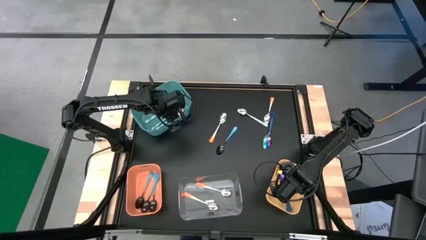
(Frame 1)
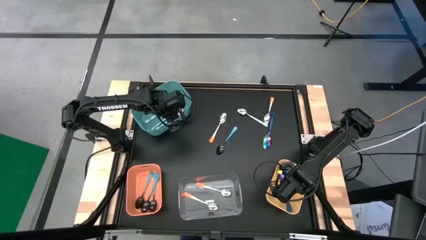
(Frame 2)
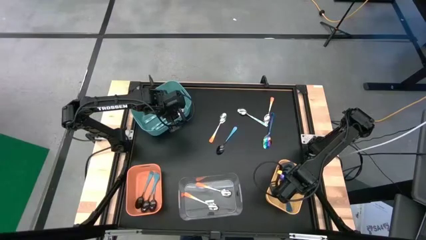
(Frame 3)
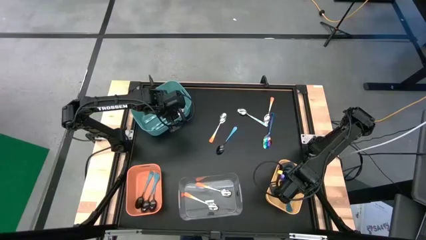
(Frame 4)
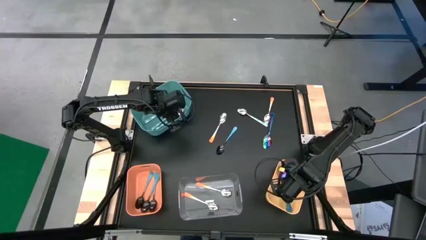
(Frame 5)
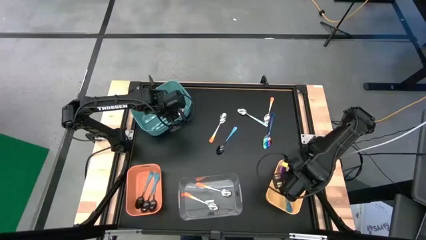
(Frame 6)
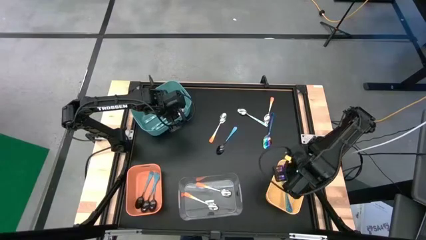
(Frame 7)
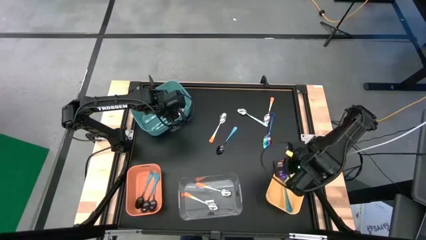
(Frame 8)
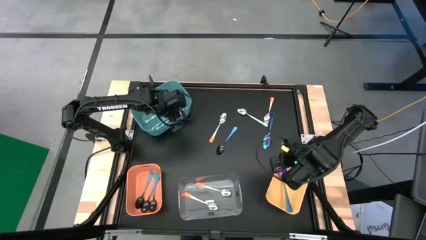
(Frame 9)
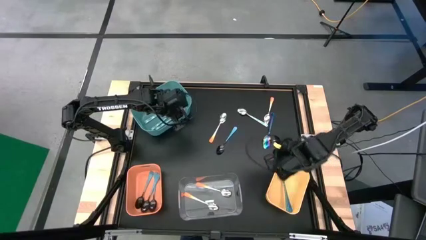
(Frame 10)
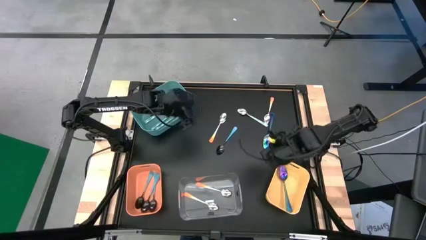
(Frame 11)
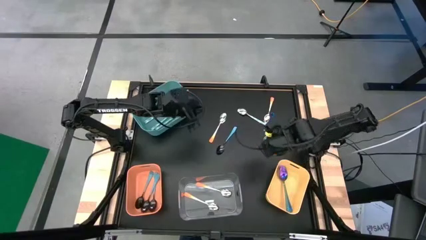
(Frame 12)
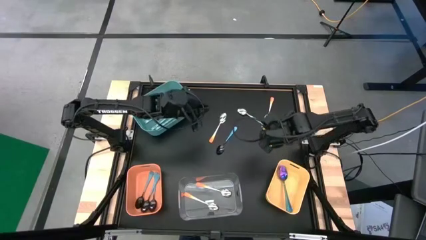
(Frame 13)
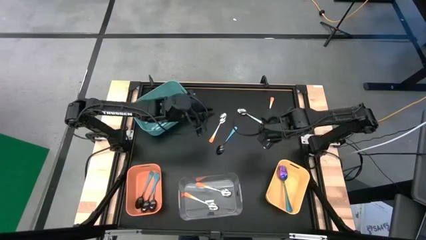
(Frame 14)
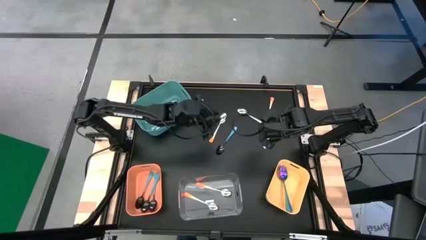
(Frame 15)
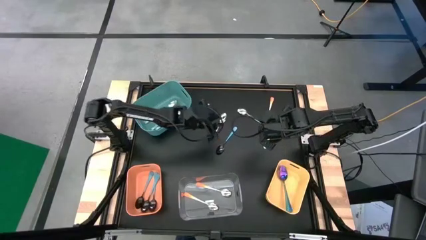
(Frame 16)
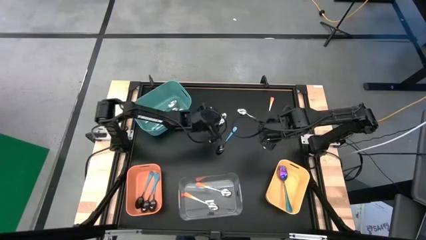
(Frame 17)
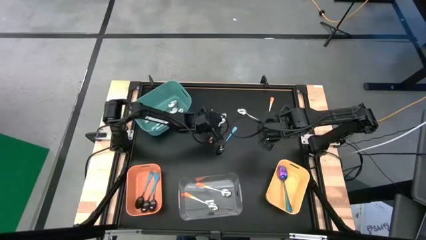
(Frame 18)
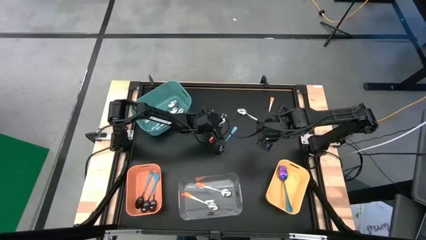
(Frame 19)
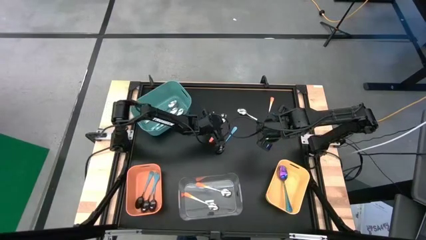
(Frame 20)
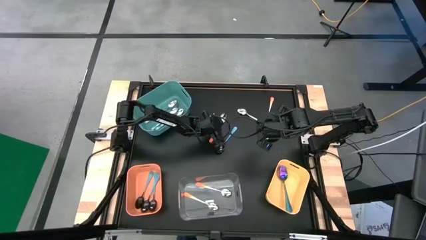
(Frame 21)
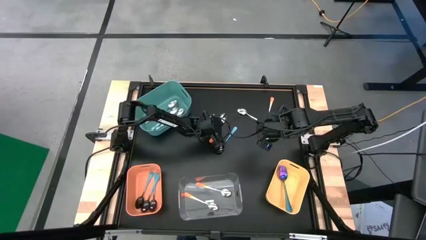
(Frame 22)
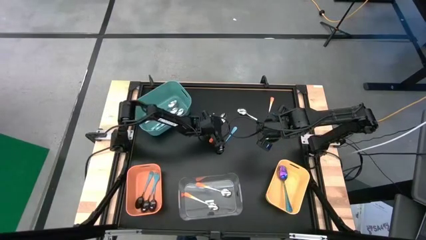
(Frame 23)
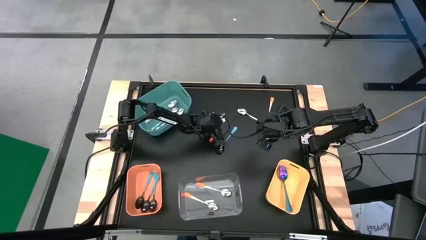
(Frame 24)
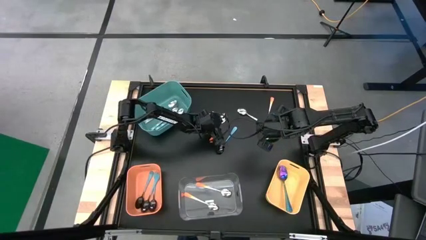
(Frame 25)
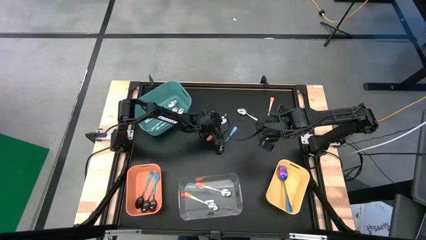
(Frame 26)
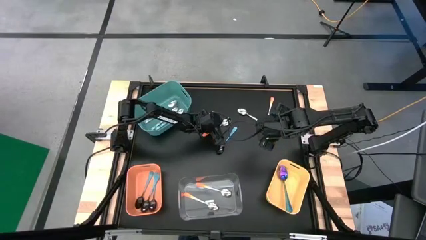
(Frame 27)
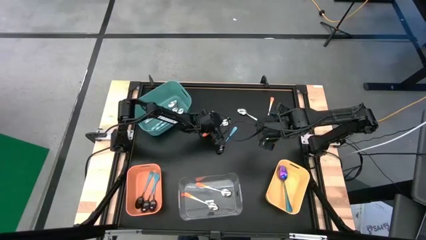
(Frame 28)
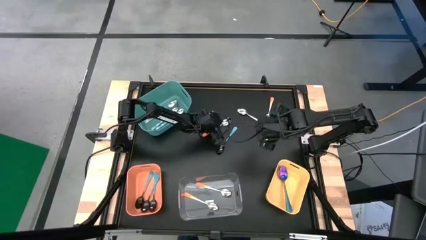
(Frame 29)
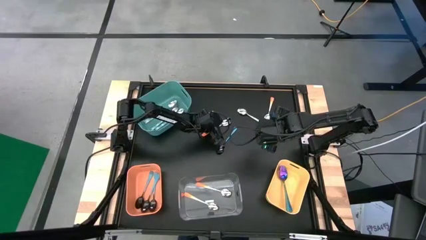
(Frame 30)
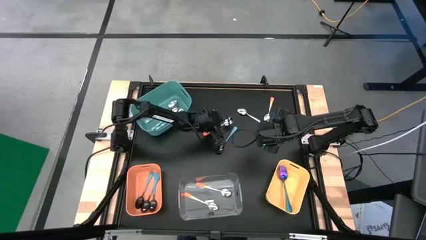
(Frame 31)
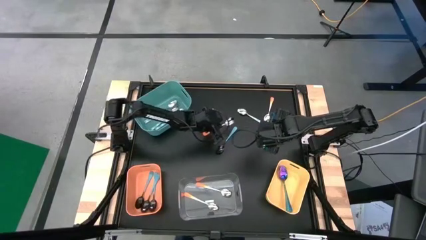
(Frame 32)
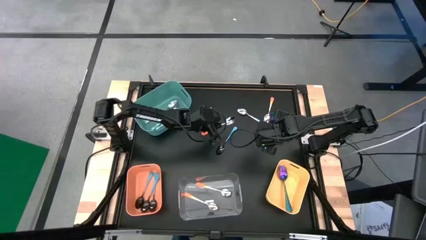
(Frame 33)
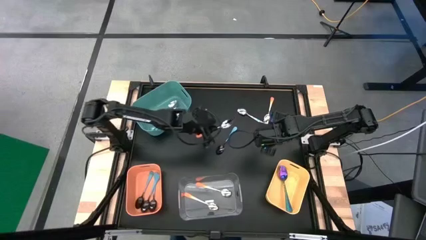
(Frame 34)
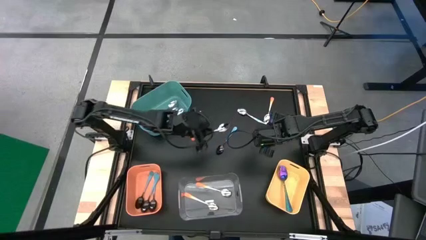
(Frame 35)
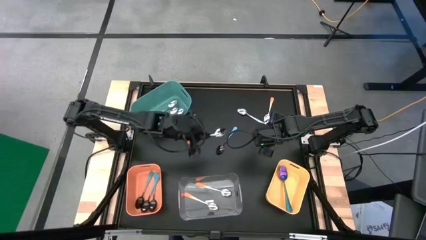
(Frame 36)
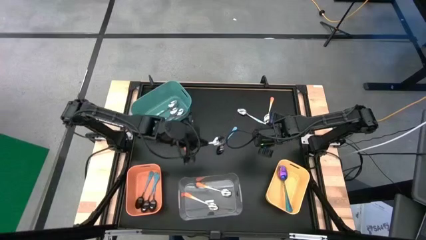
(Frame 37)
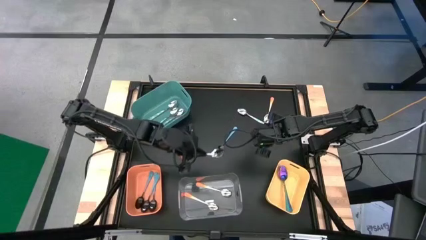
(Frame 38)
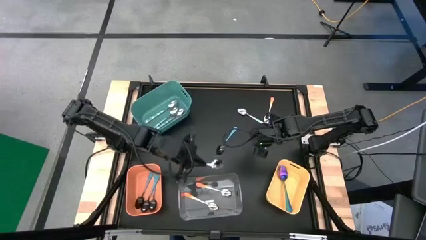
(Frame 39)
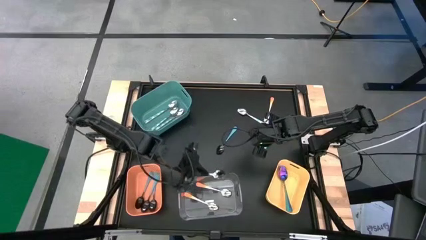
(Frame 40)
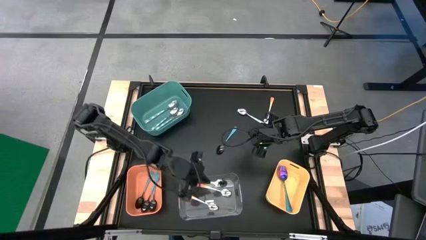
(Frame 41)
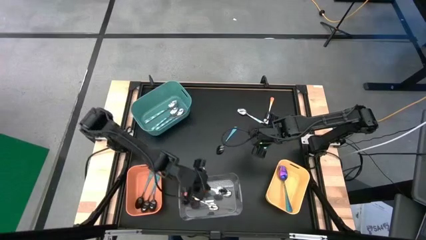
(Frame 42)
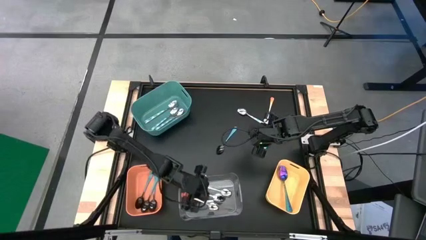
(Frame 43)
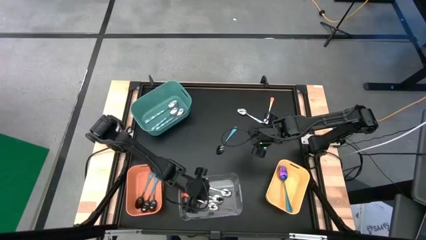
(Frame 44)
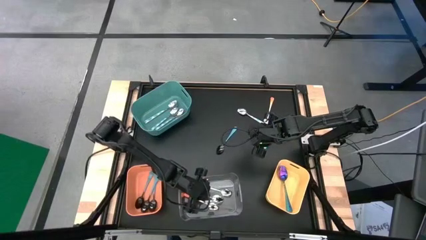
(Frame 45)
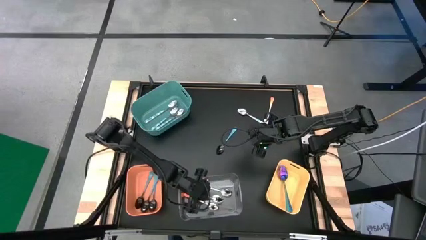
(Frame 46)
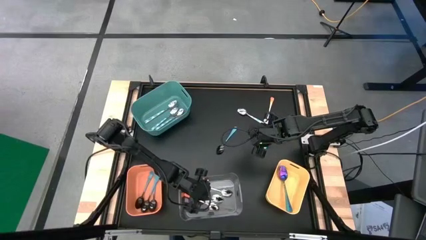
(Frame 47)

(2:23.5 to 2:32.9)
Task: Sort silverware by color (type)
Put the orange spoon into the transparent bin

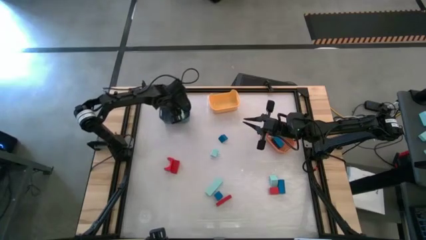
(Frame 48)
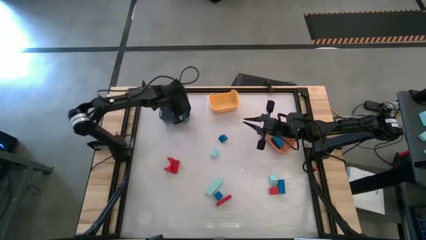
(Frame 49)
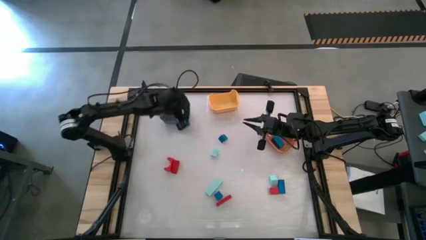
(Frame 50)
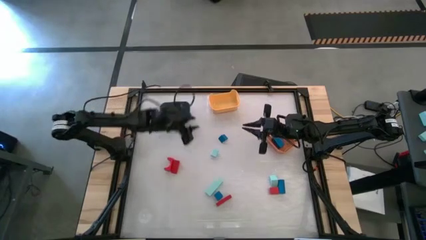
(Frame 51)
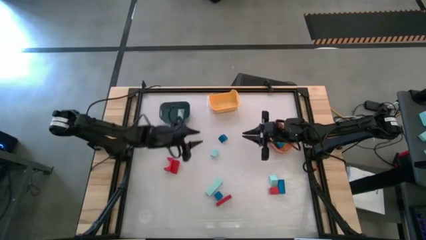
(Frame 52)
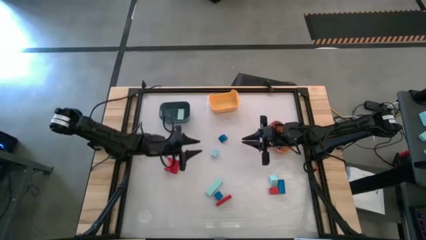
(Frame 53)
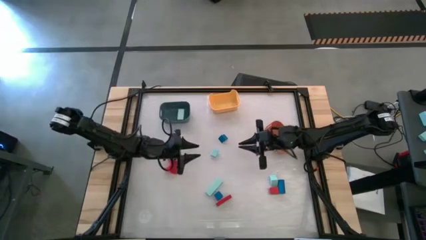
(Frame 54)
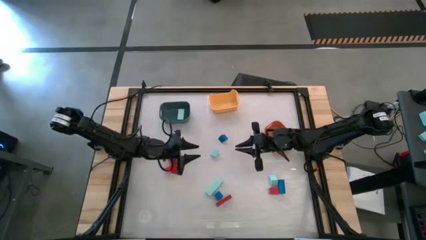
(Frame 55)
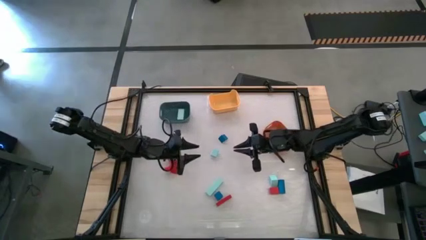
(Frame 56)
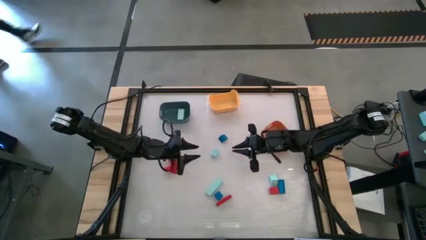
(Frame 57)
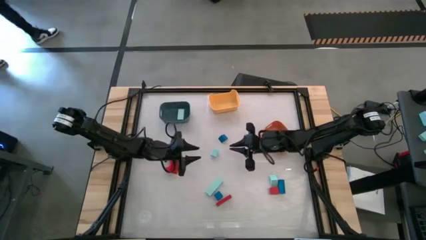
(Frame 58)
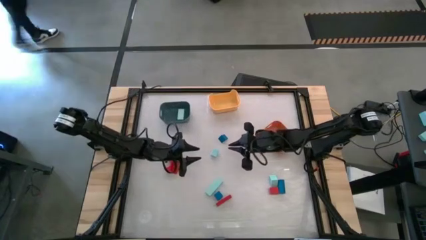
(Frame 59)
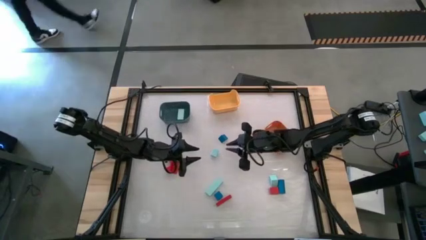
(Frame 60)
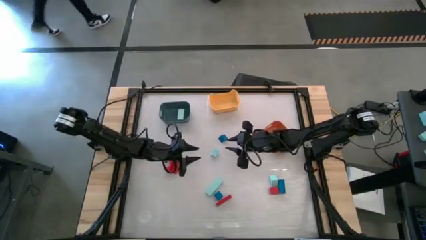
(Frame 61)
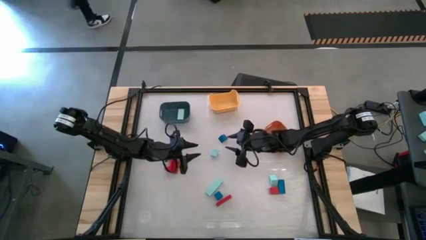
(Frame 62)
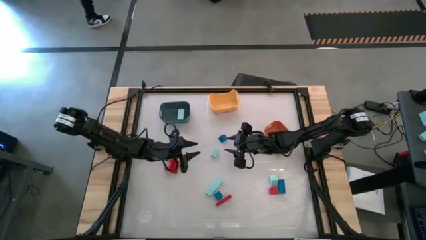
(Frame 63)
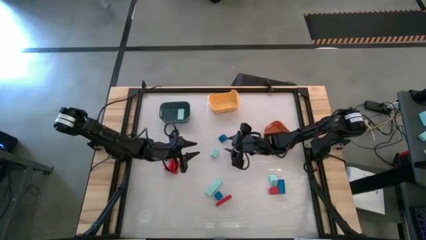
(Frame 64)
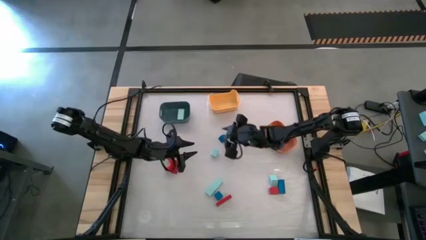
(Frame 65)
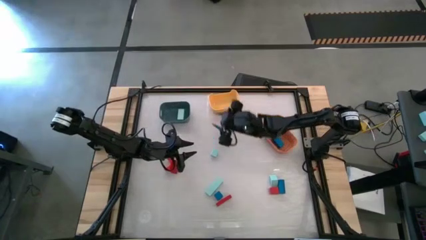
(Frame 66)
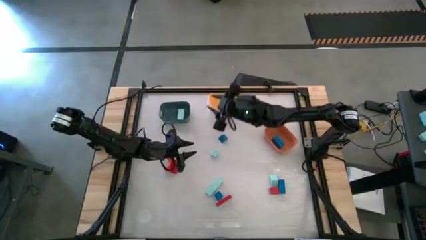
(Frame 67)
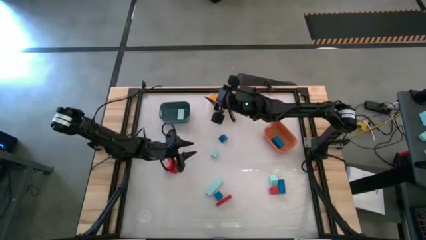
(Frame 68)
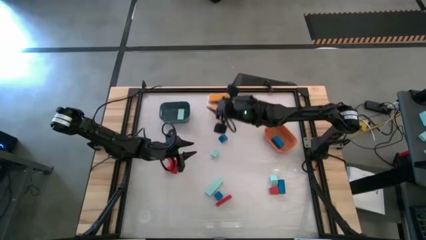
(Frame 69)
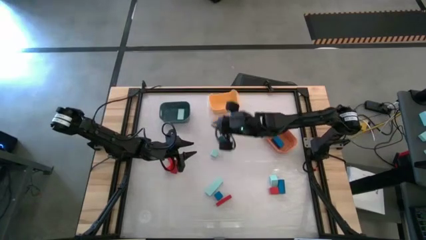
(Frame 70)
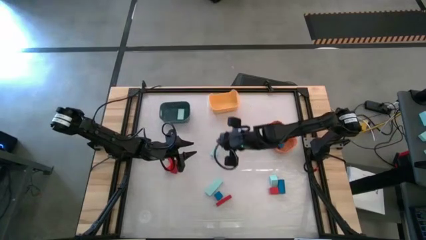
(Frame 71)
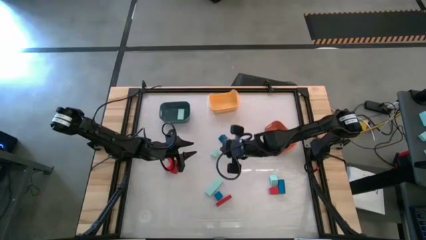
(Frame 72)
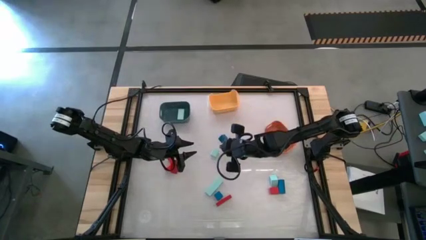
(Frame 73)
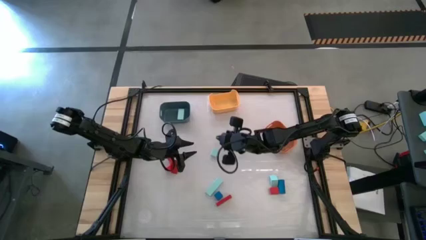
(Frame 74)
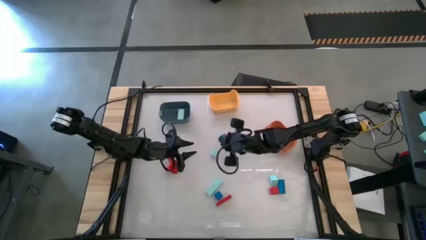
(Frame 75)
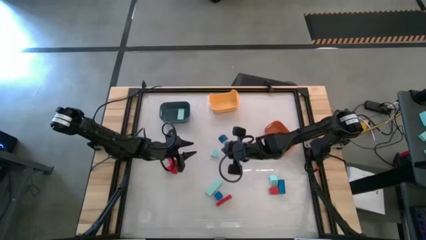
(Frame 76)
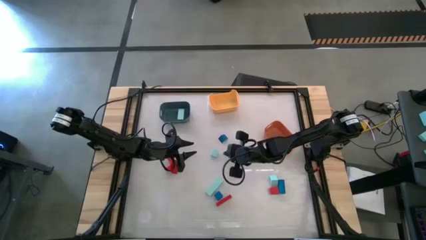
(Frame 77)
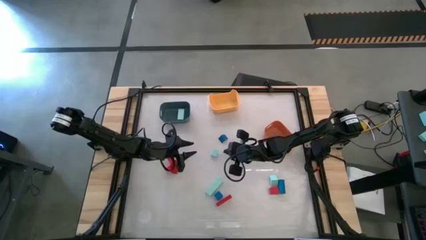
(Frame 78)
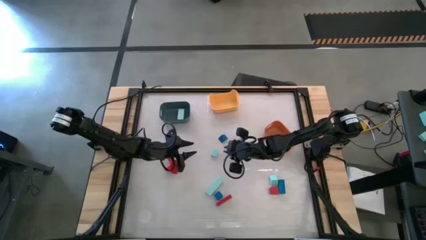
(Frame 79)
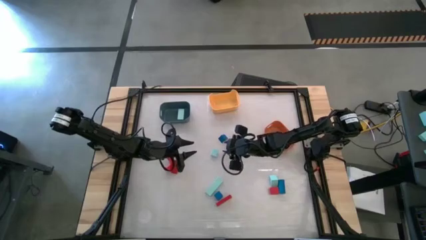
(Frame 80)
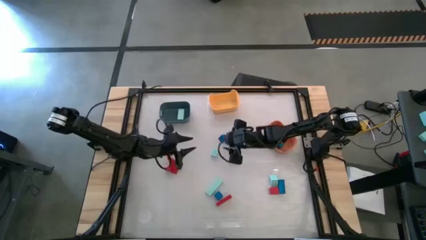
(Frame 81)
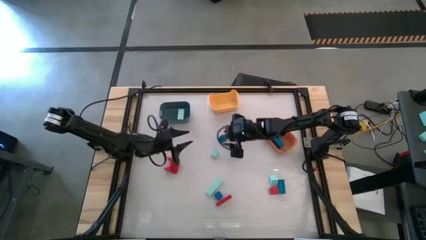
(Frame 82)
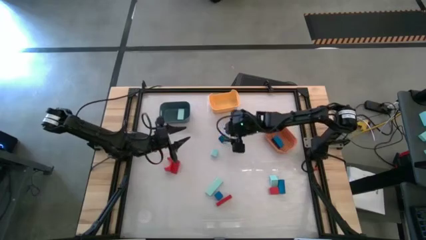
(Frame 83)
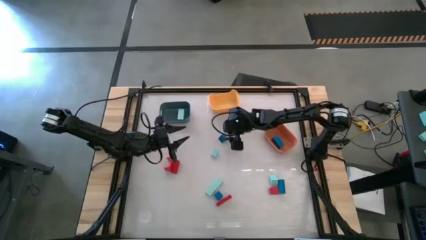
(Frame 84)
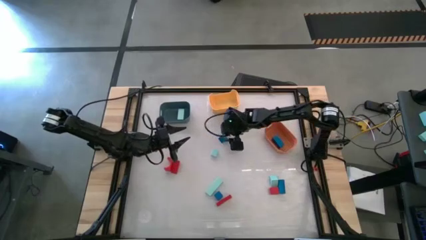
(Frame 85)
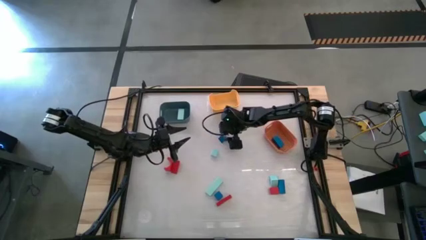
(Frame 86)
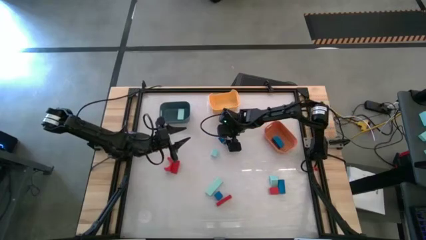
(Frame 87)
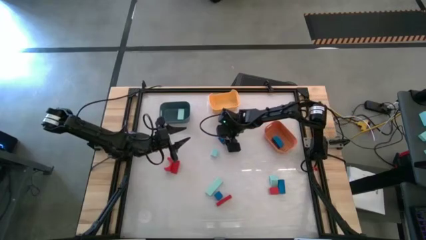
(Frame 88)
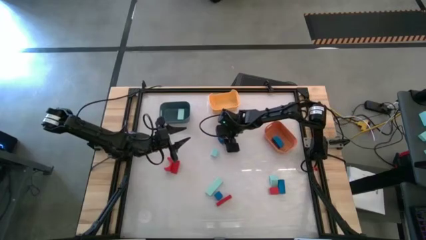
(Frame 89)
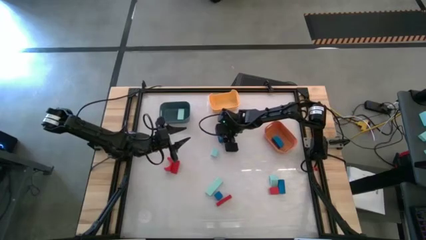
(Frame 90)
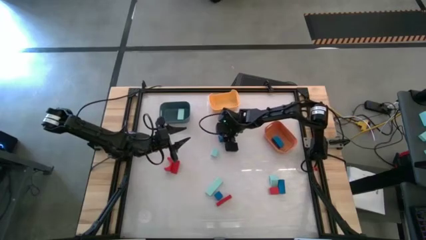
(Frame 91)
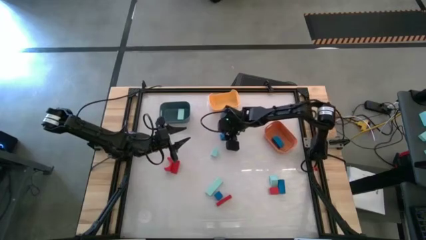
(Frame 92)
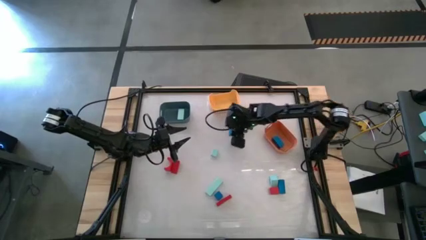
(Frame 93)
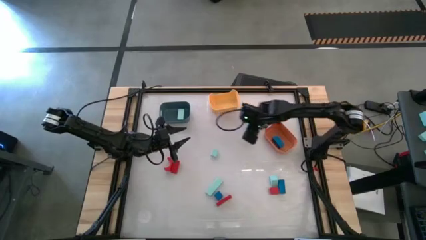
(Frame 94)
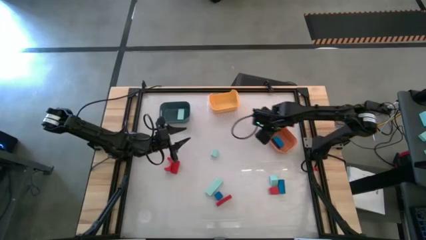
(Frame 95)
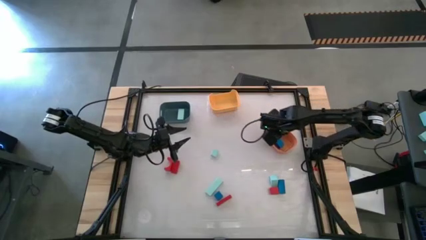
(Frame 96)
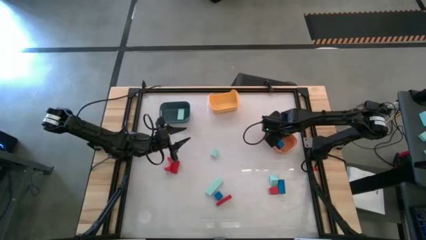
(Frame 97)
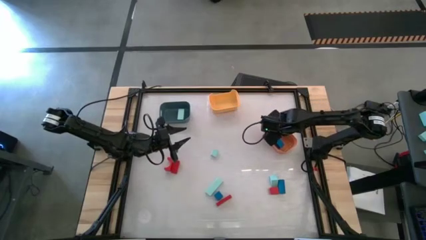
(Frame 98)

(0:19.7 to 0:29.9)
Task: Sort & place blocks by color
Put the blue block into the orange bin
